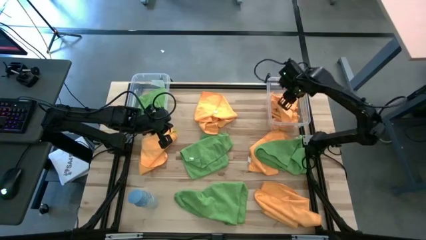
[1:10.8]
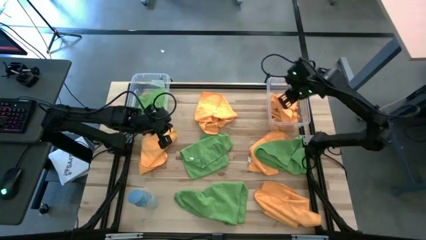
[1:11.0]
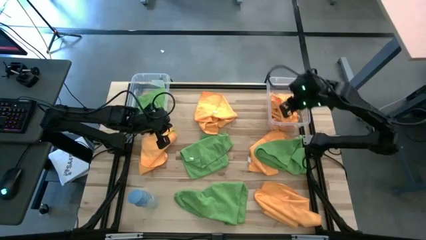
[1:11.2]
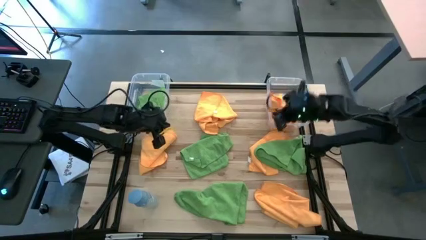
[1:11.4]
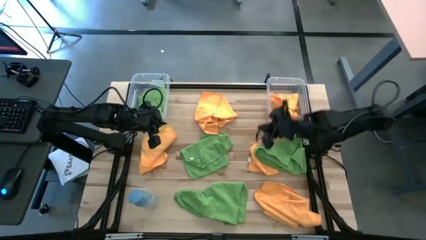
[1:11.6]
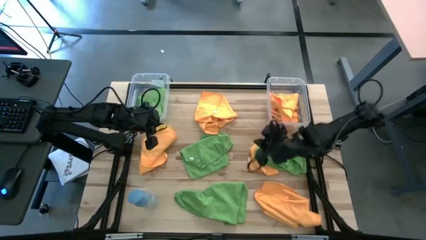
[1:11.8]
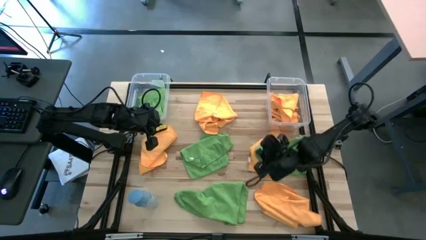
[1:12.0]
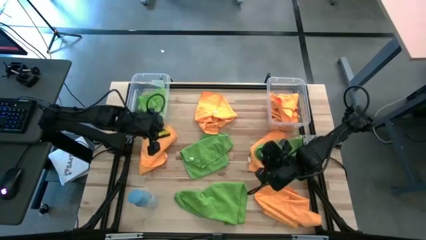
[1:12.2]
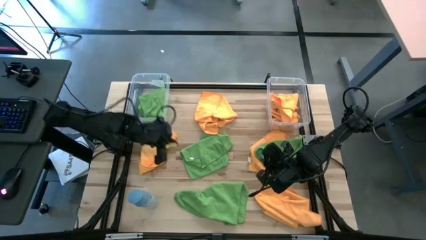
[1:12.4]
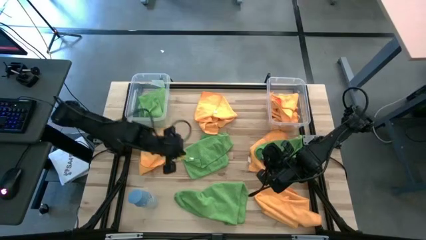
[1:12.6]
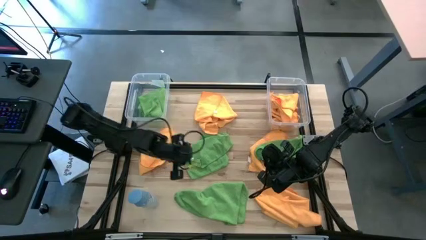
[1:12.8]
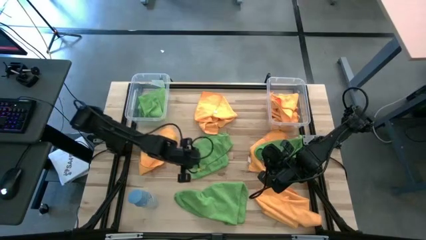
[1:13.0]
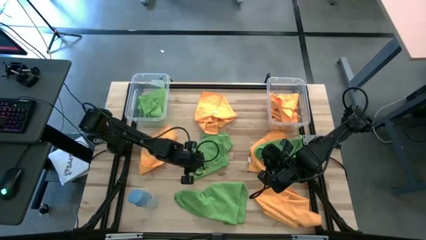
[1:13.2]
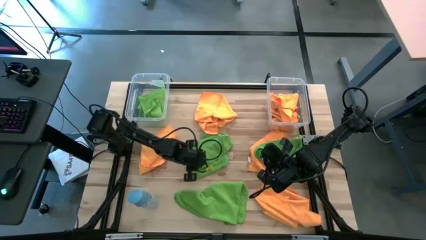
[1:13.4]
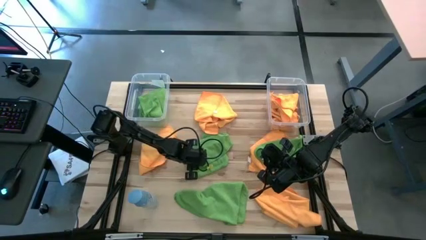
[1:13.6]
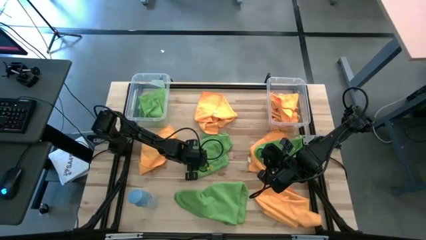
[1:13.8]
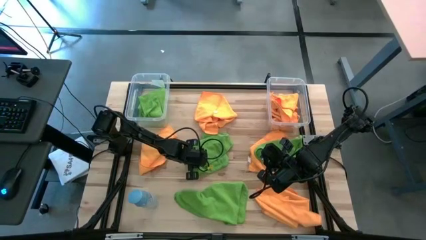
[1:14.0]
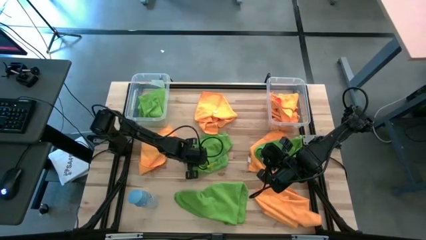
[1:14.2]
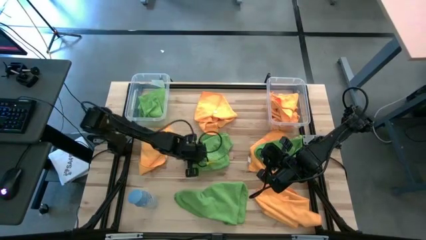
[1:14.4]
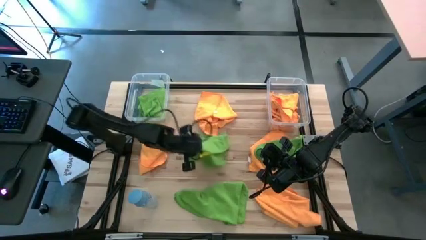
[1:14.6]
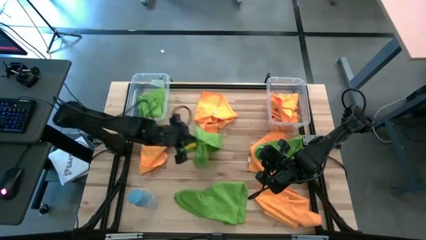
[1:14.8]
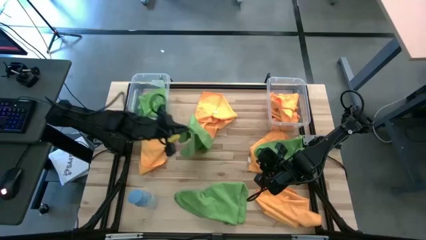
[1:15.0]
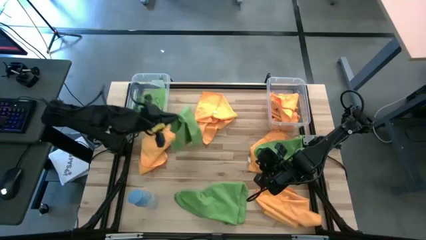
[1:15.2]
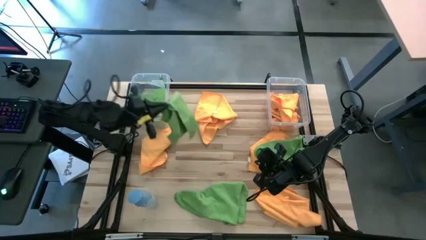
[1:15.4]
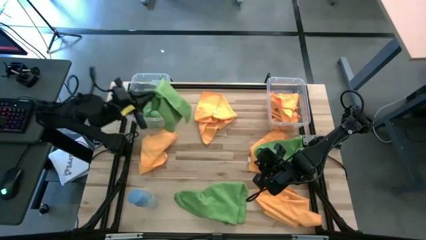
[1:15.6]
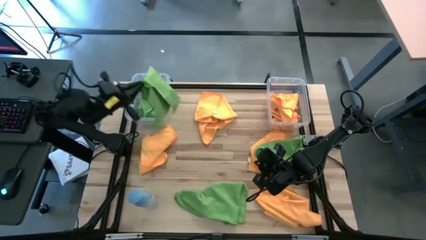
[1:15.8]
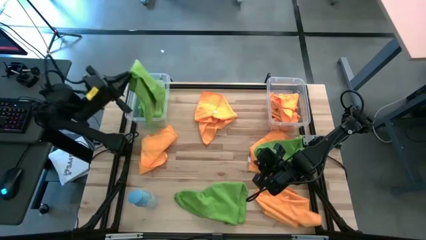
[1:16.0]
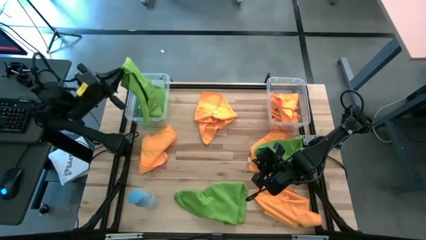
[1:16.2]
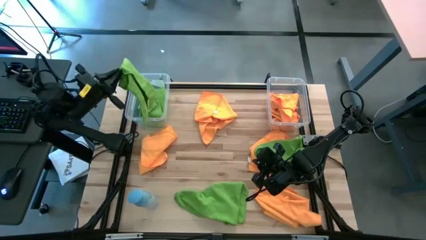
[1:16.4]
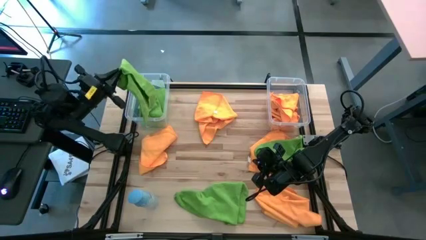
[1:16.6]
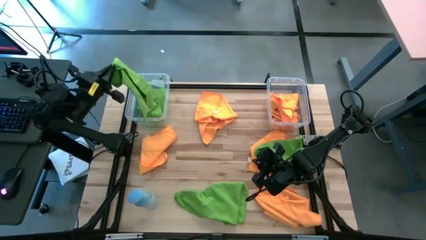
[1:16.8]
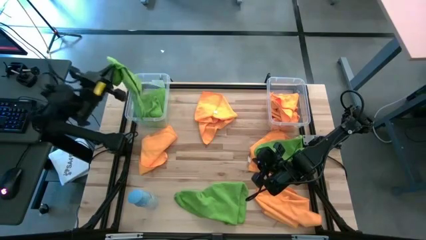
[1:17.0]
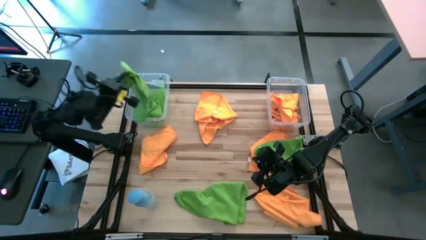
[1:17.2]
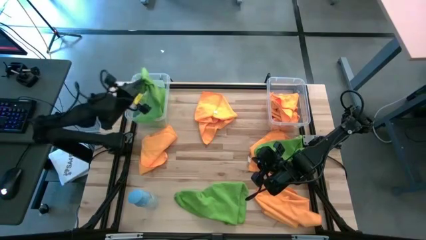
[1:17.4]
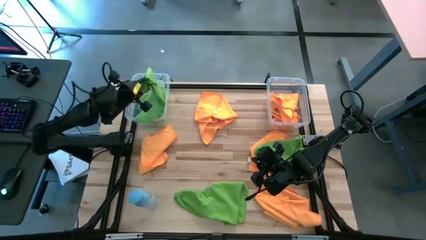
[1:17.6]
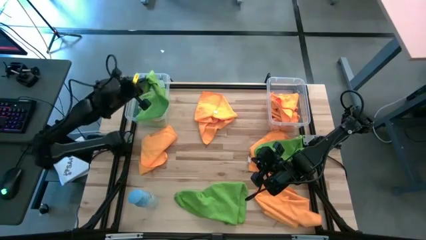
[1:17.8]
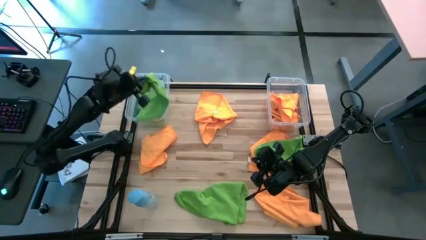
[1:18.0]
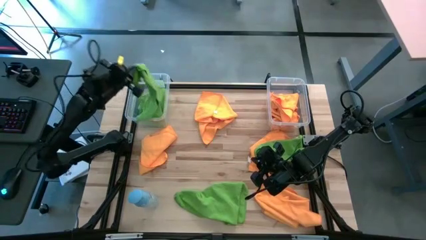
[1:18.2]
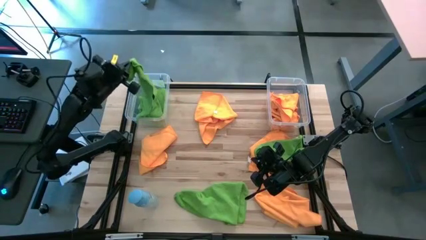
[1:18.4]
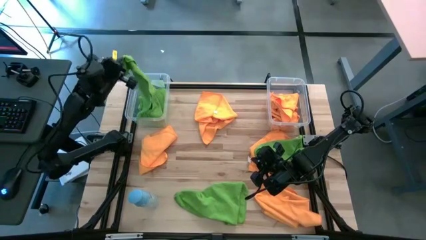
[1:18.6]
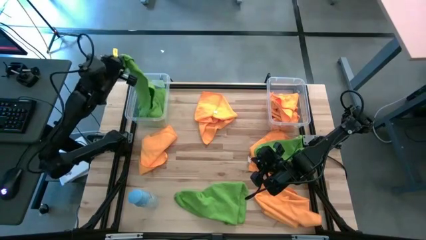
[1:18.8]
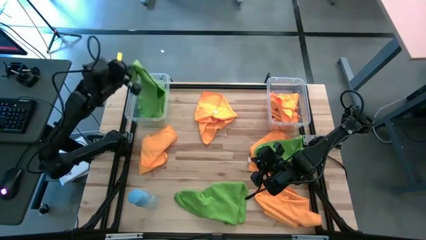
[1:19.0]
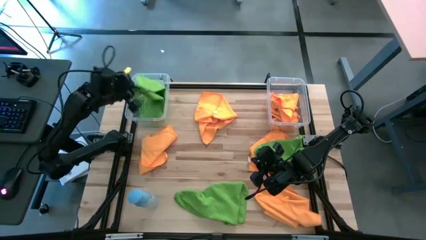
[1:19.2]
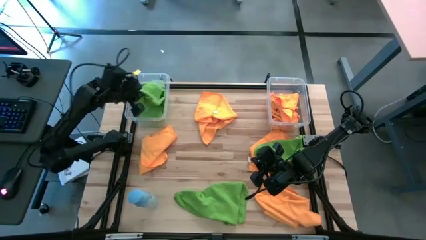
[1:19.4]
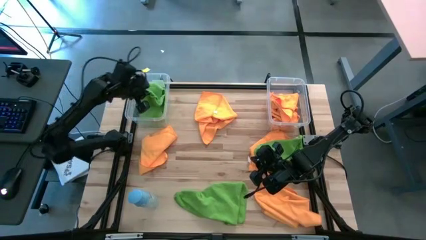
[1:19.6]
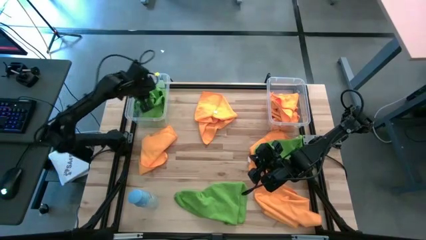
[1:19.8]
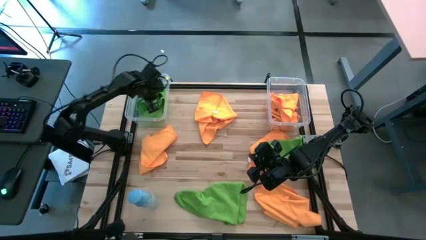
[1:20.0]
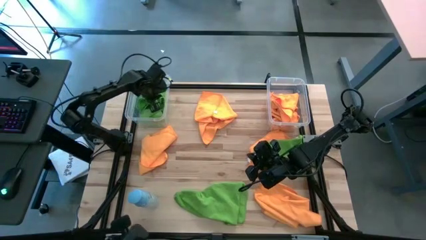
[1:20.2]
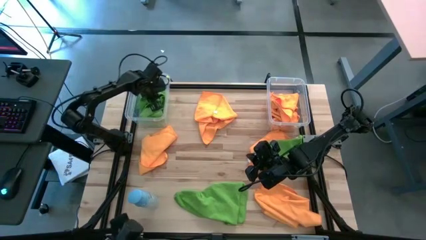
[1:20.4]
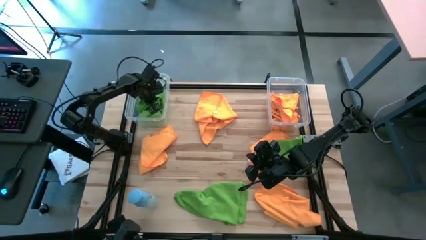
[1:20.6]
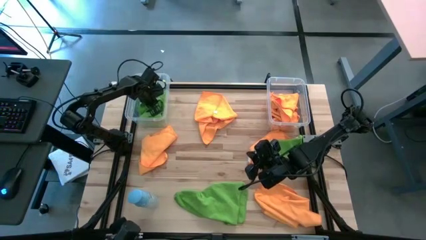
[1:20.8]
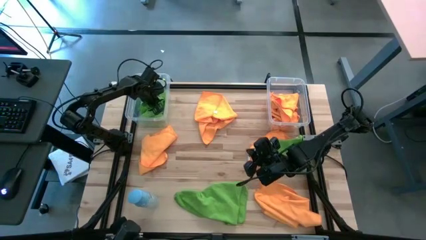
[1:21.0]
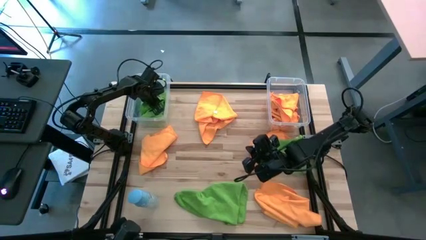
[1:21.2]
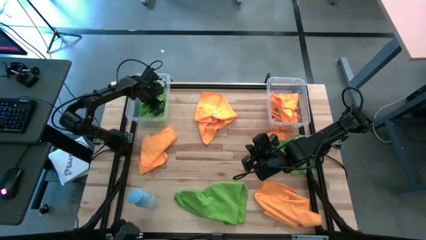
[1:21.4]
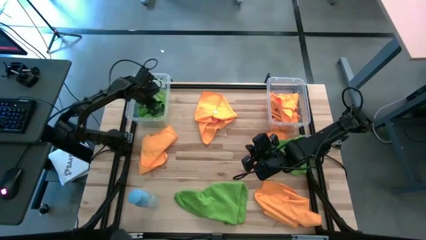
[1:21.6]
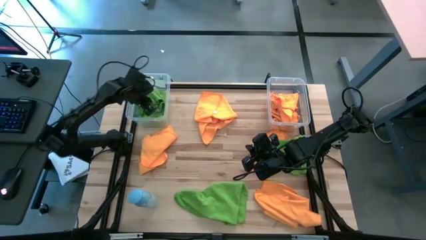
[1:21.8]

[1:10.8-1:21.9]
Task: Sort microfiber towel by color & place in baskets
Put the green microfiber towel into the left transparent bin

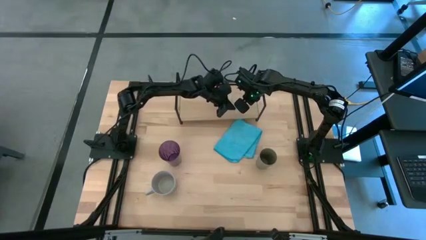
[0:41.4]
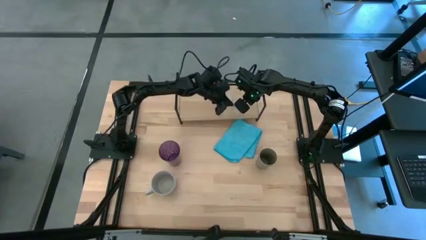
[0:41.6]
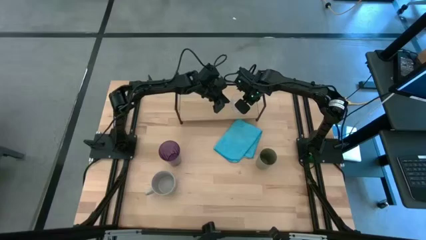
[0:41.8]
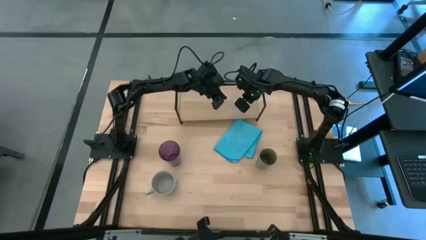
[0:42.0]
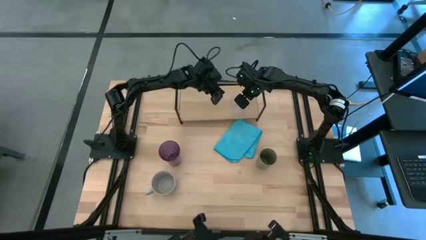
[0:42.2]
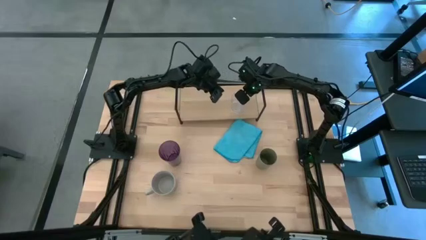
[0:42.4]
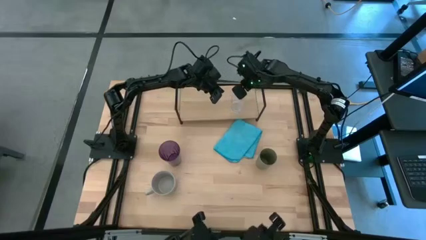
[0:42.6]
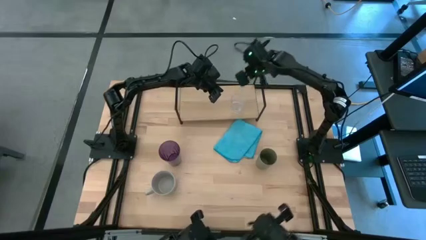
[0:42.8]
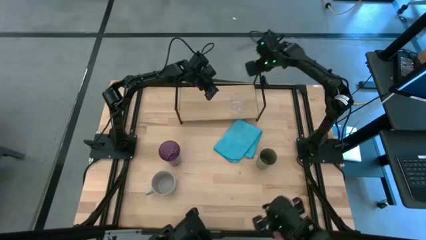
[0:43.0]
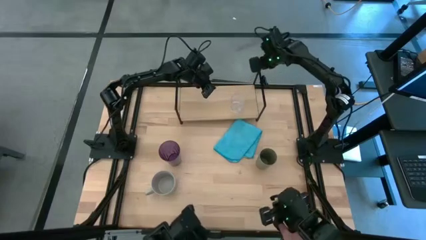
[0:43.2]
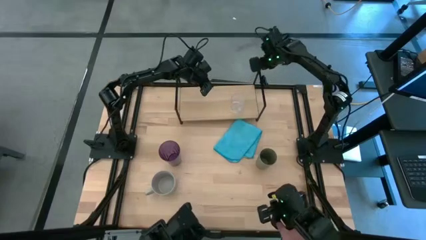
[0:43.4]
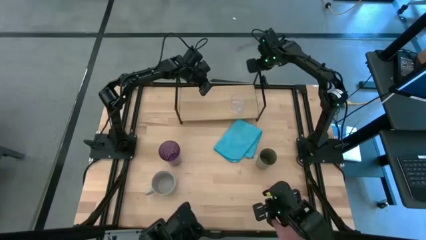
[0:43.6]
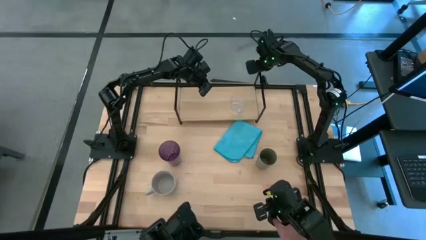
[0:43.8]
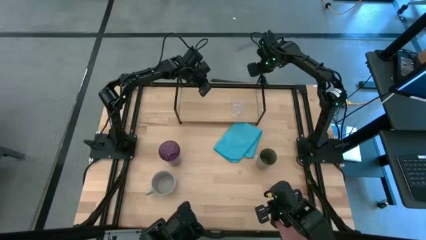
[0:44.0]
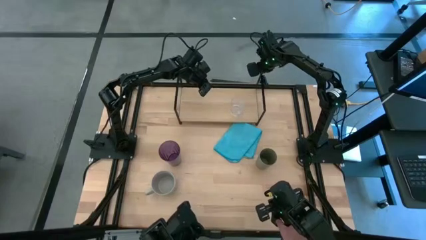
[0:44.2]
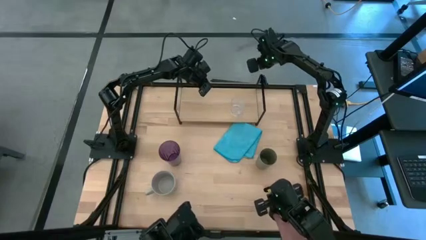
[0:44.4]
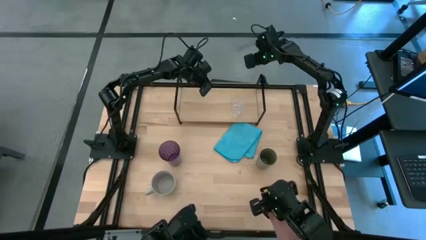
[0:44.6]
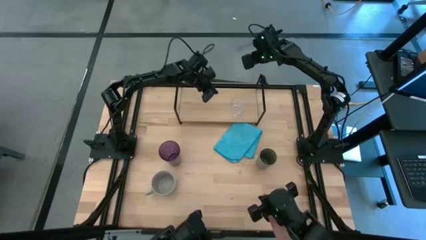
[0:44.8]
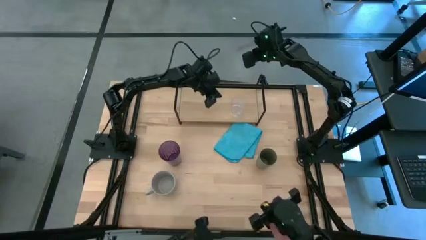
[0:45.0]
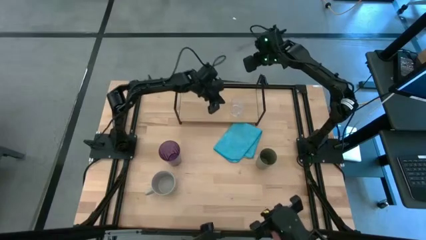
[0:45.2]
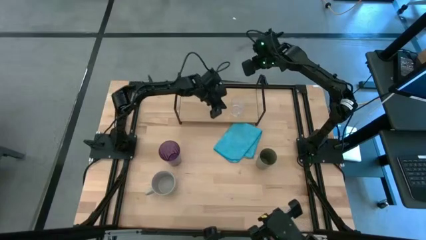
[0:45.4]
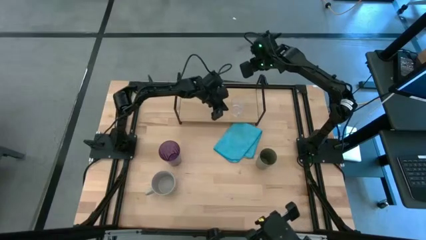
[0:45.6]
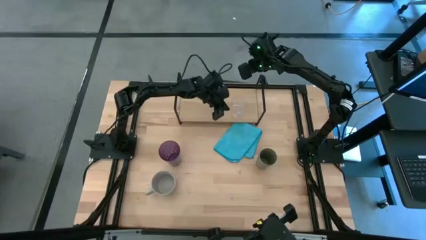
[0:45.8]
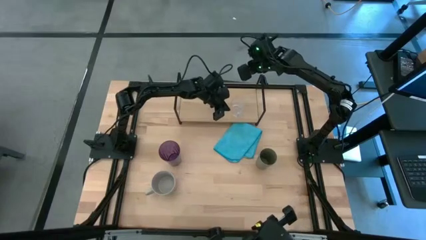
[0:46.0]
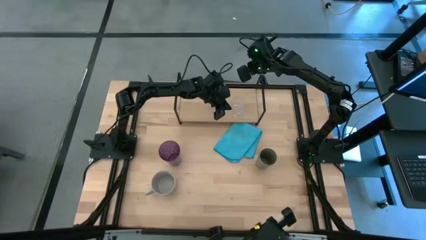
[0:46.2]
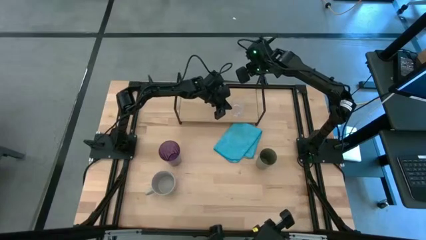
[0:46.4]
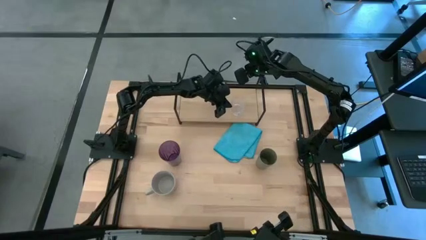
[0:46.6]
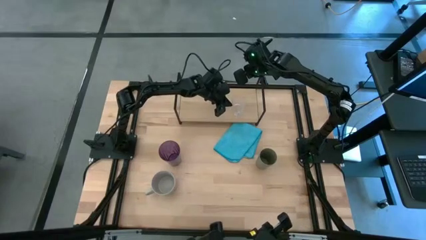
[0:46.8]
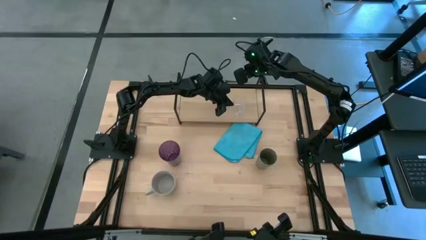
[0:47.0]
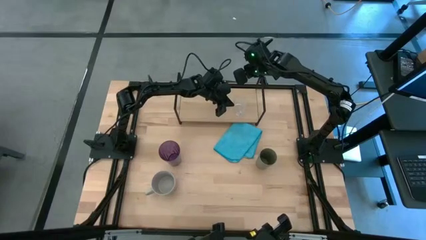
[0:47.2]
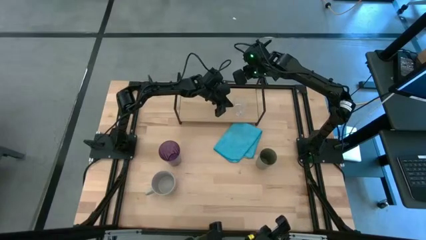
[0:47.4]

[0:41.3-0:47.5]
Task: Stack small to large cups/mugs on shelf
Adjust the transparent mug and shelf on the table
